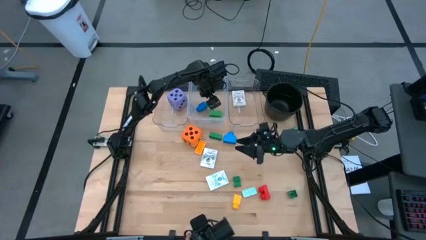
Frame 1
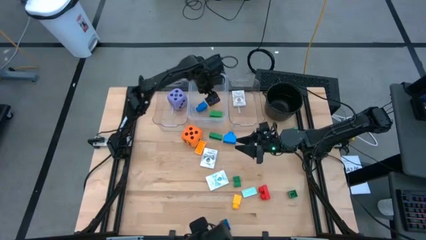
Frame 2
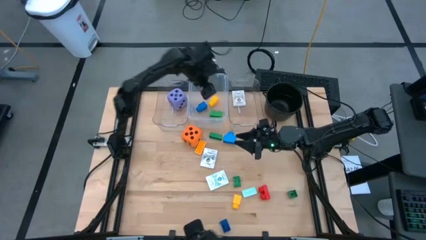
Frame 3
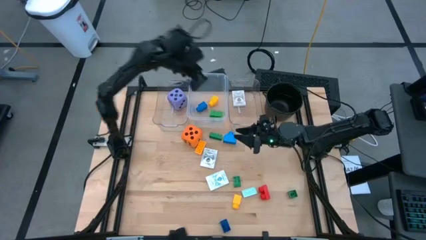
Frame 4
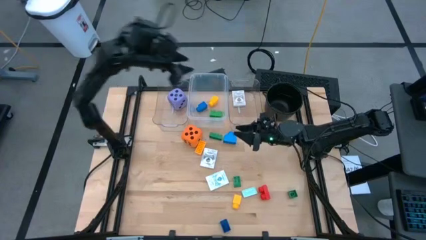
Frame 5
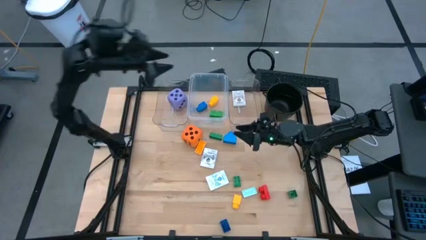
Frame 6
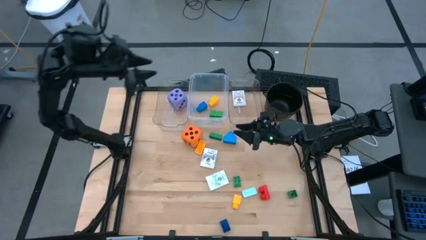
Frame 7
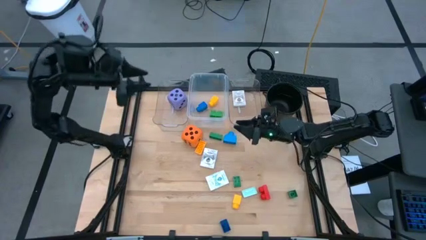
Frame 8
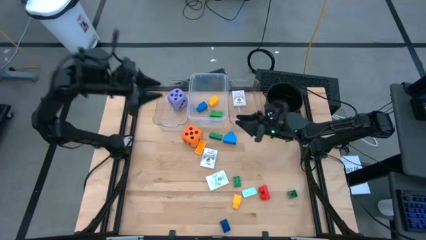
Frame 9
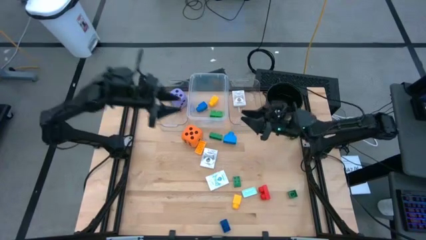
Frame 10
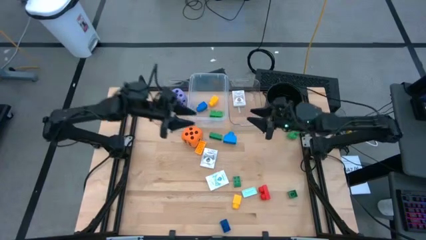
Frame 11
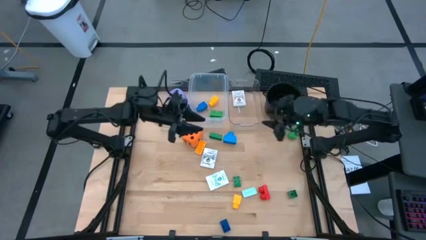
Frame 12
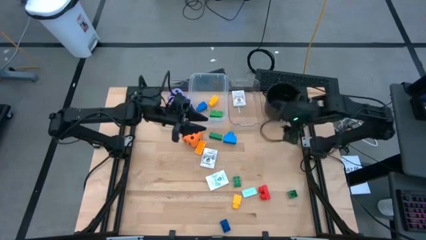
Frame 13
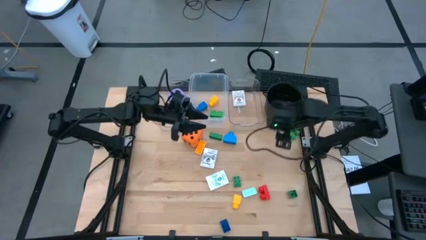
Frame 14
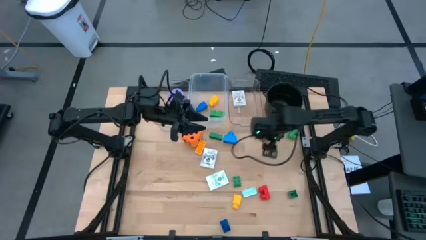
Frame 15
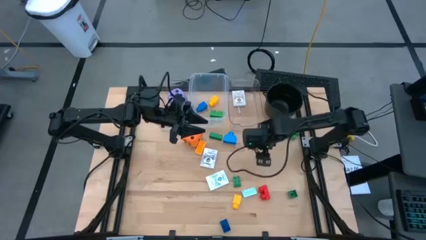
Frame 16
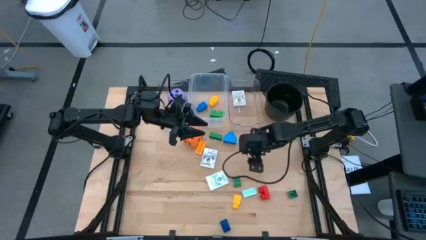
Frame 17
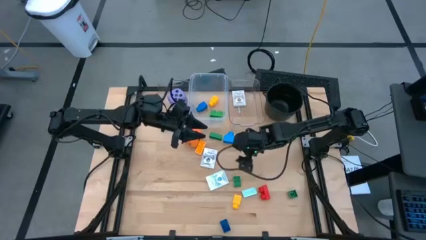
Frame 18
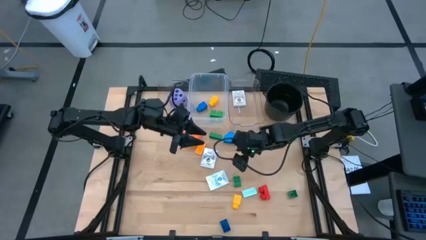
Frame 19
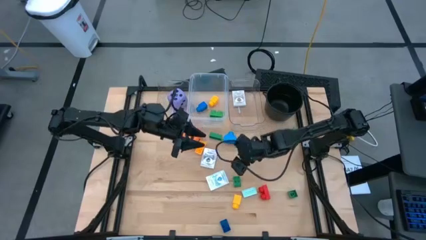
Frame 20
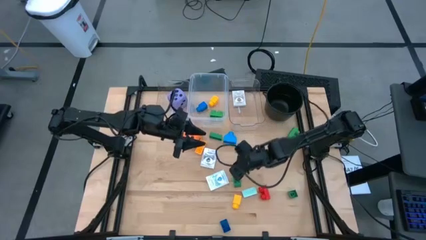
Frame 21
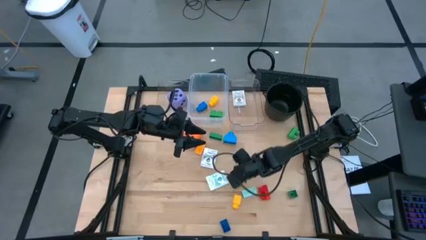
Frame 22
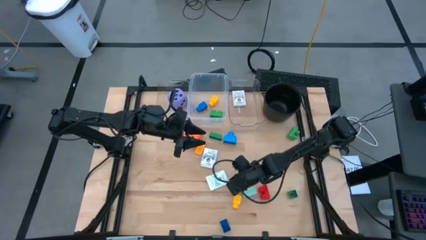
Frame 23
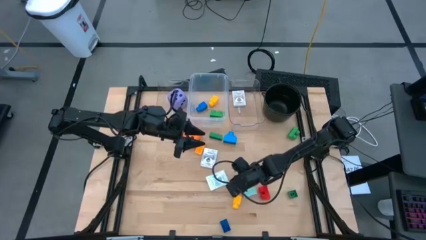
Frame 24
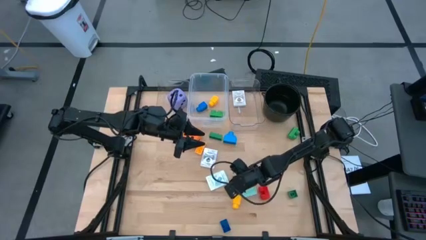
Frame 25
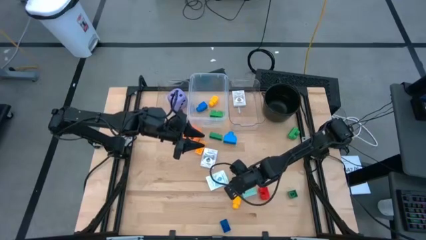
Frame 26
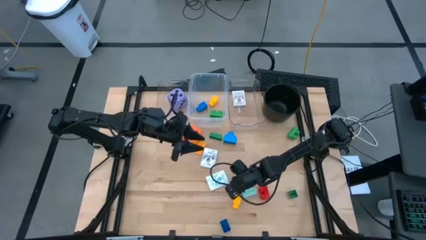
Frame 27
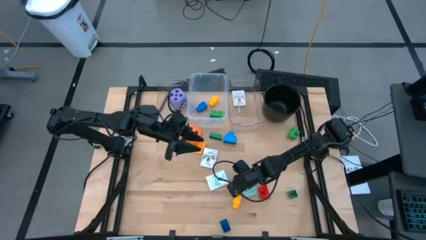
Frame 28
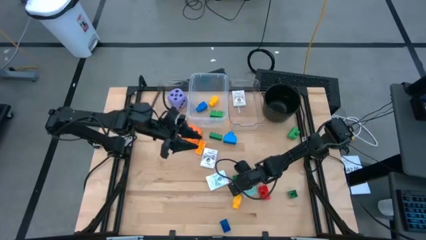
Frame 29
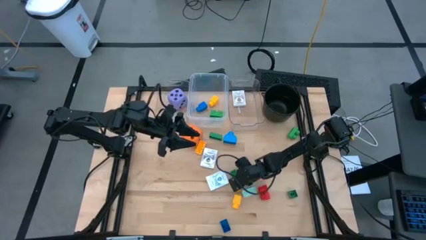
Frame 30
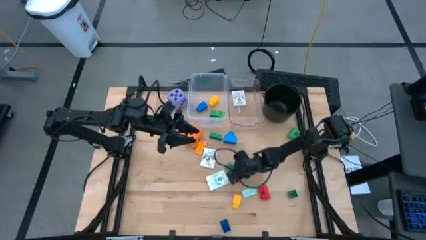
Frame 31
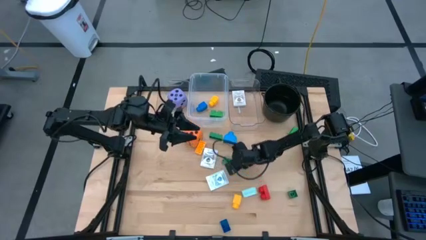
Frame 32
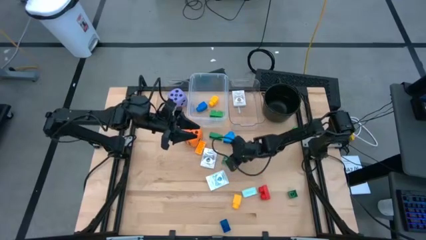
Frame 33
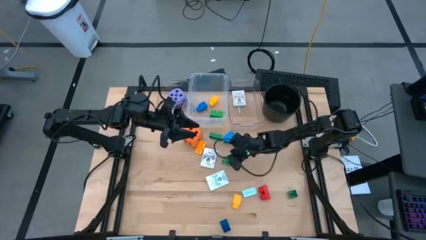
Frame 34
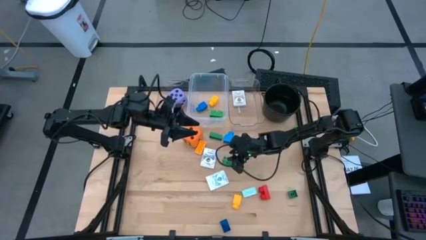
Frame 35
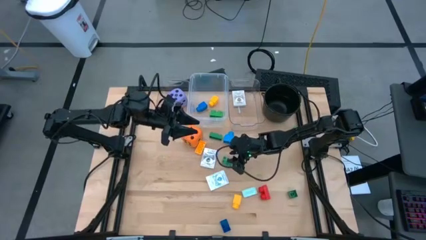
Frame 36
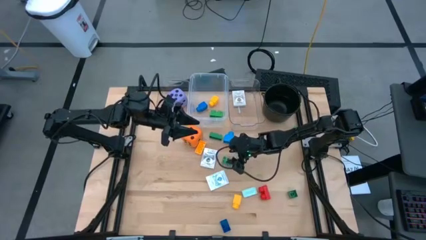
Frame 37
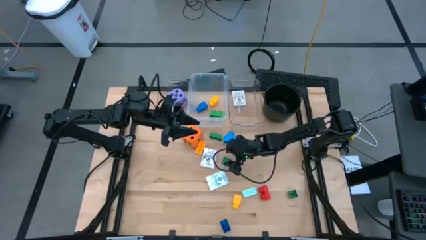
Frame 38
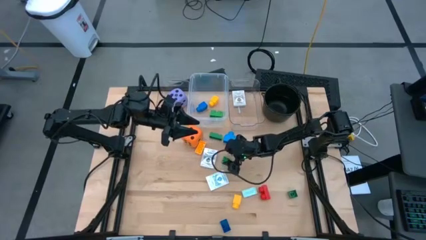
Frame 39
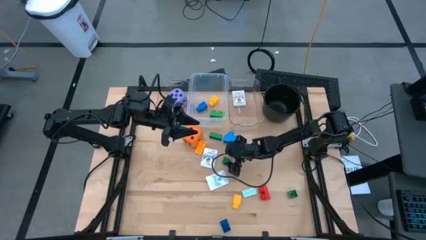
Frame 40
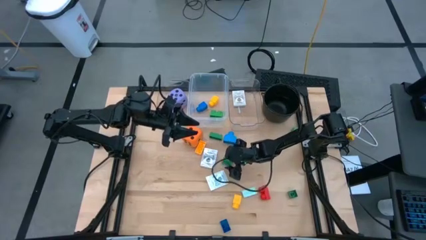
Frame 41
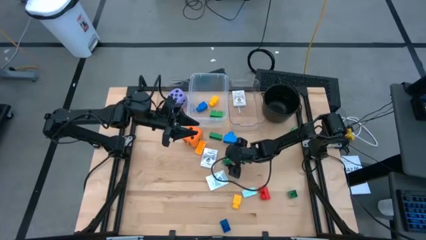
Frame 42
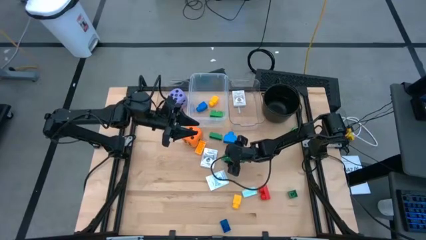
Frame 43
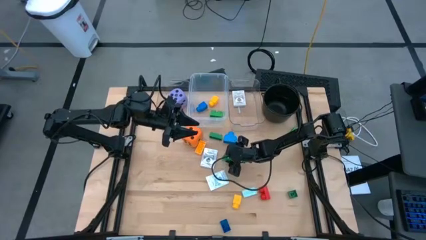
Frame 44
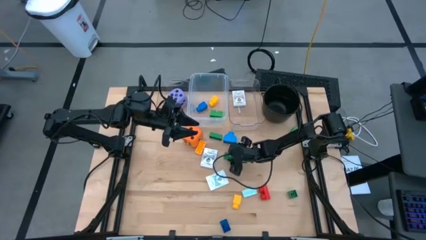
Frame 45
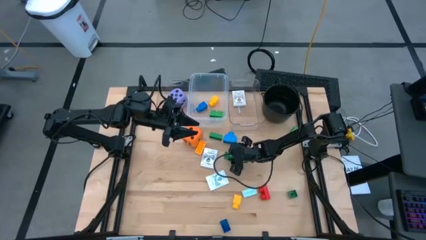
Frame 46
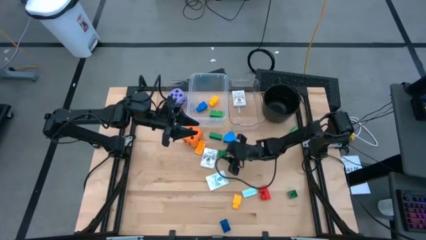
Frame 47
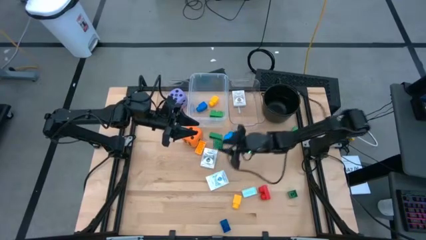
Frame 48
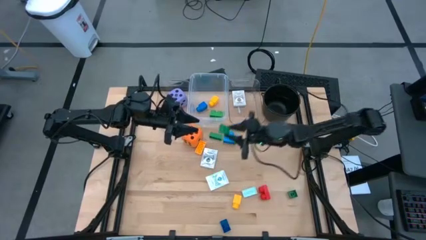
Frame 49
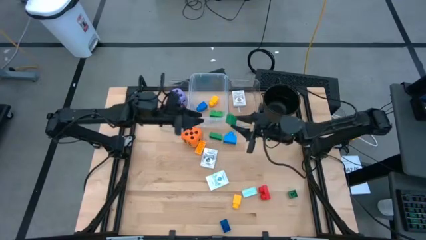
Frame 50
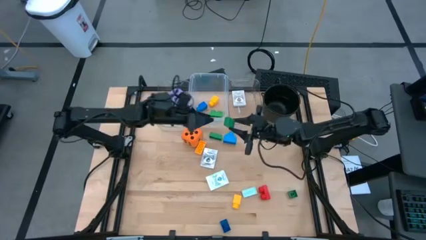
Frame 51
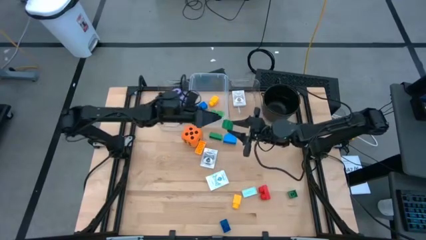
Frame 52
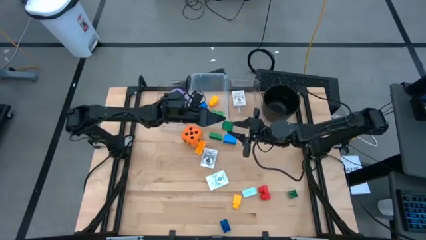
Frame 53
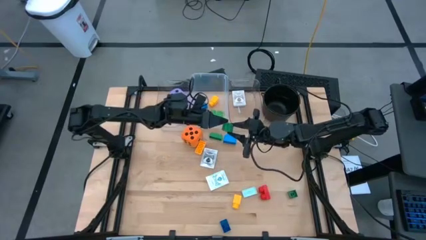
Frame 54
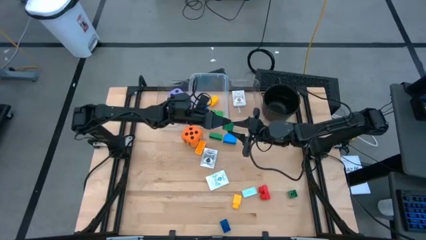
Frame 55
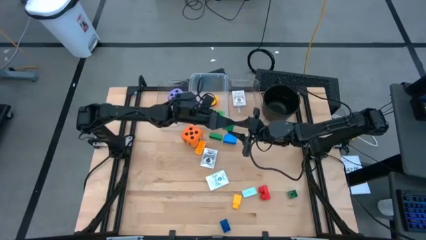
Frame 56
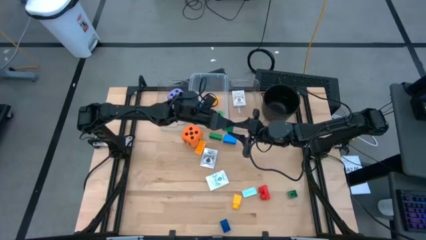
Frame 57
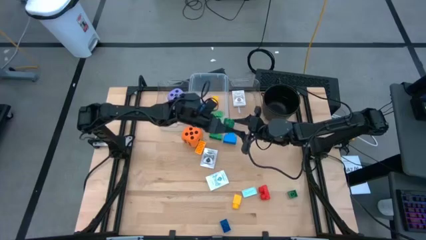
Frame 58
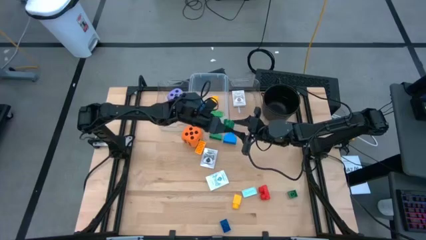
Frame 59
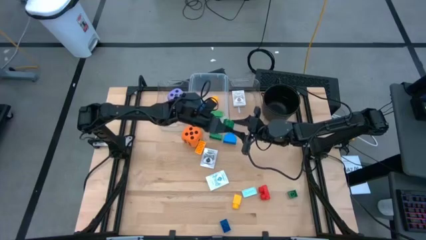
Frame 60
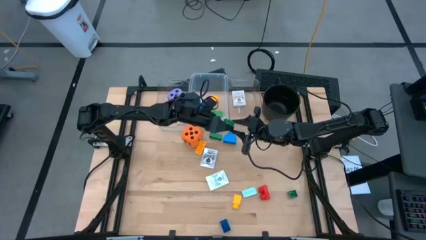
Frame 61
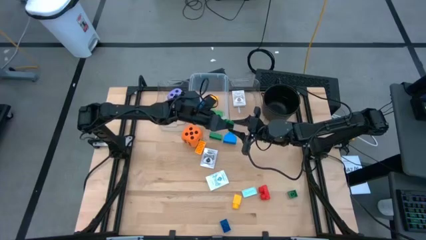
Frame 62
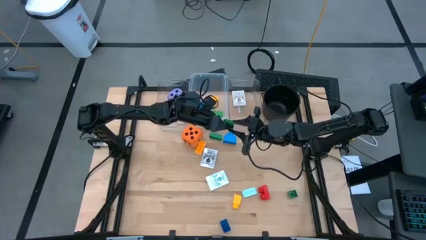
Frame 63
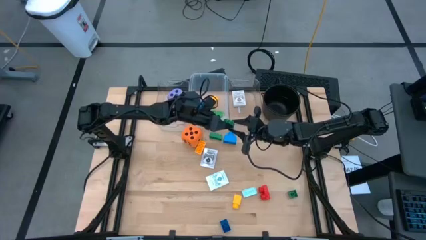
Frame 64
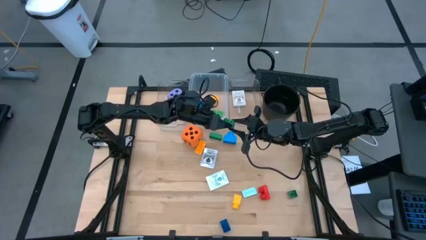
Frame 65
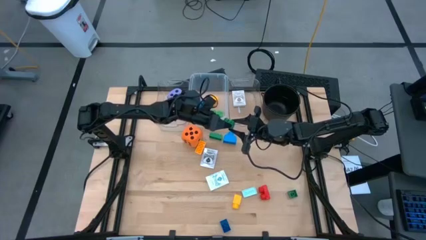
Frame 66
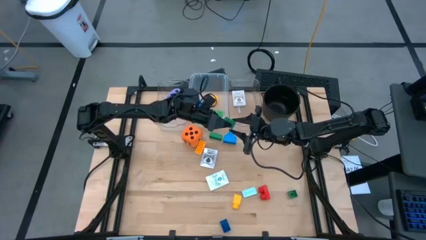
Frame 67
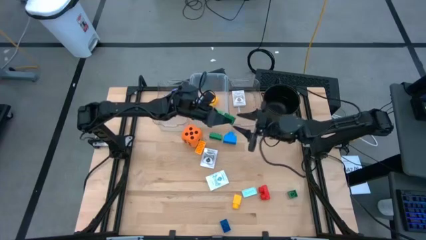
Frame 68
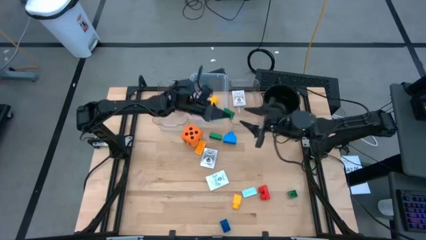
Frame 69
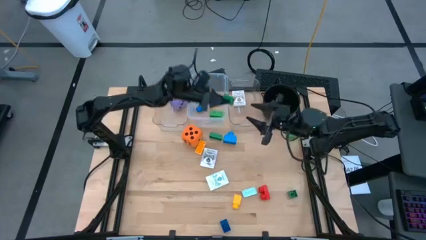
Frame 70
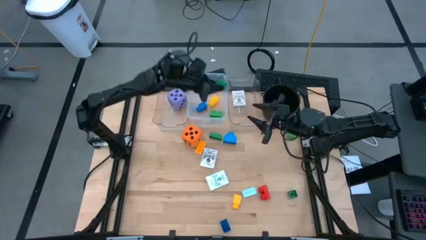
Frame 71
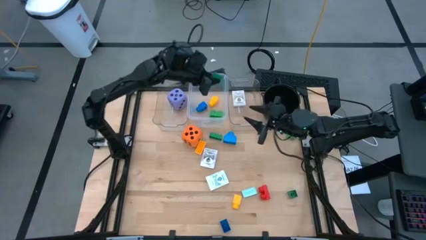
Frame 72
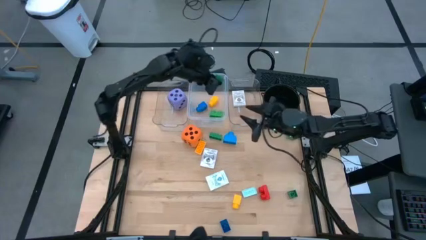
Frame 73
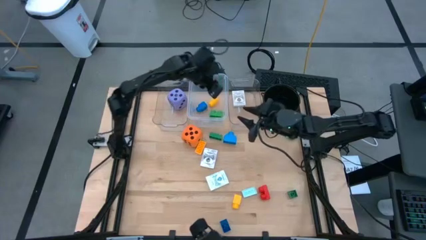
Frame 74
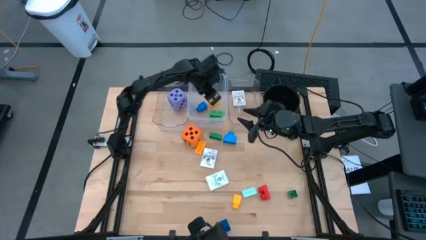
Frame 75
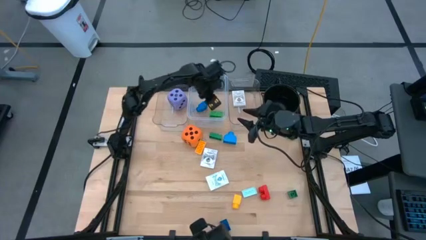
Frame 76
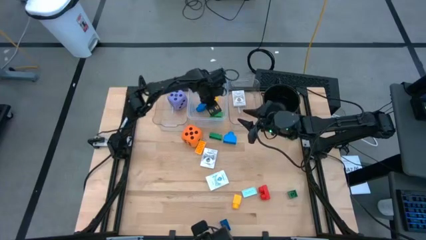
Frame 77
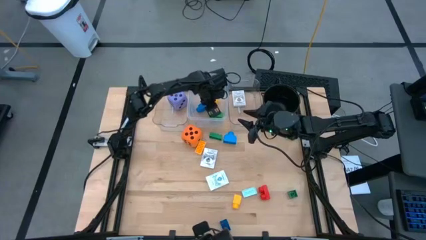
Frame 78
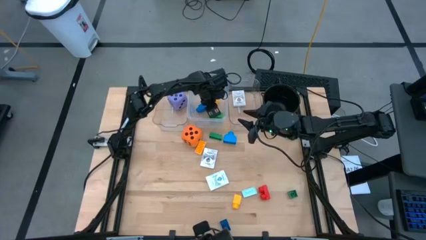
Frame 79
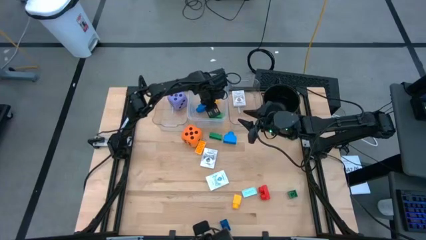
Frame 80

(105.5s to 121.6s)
Task: Pick & Place Toys
Put the green four stud game piece into the middle transparent bin

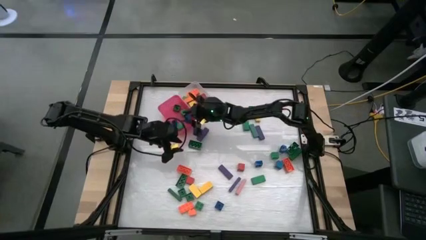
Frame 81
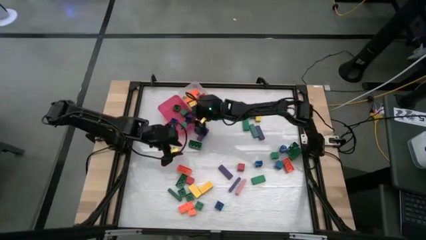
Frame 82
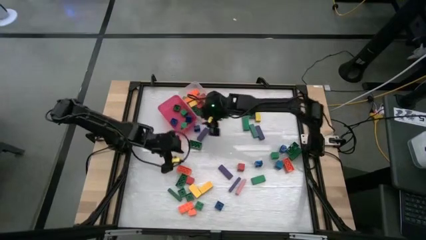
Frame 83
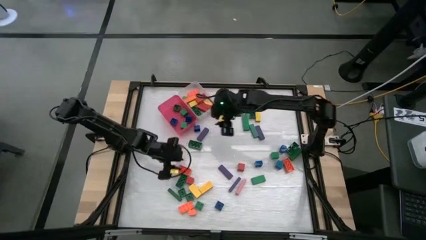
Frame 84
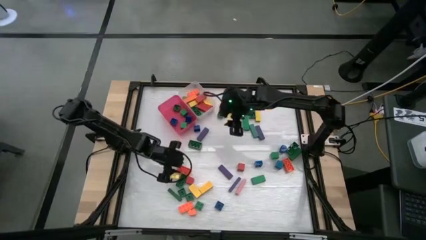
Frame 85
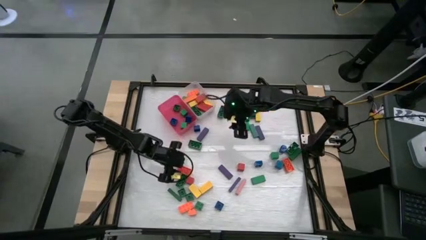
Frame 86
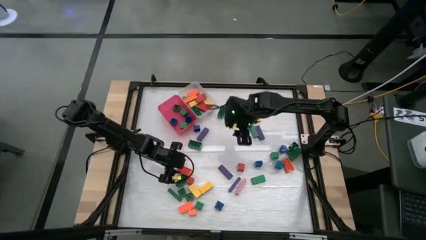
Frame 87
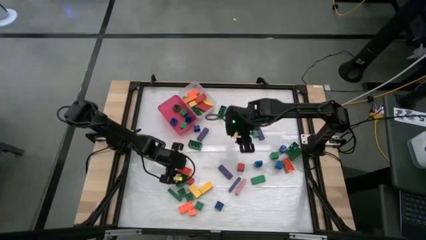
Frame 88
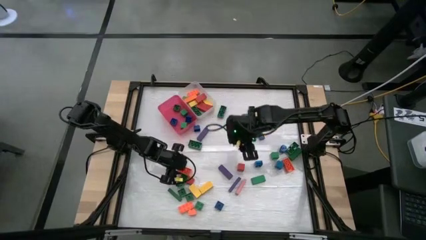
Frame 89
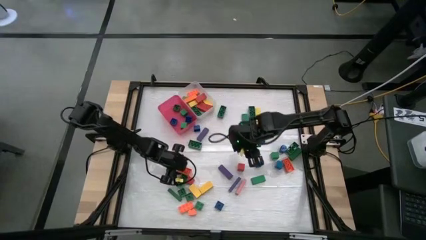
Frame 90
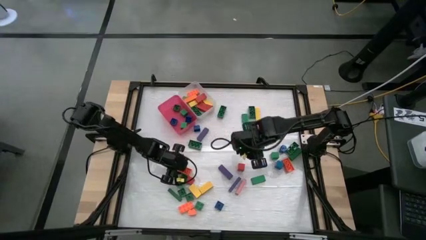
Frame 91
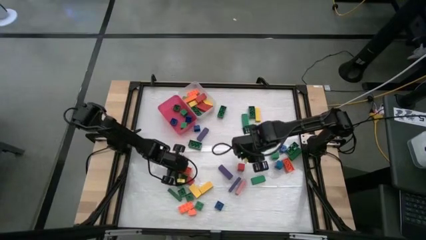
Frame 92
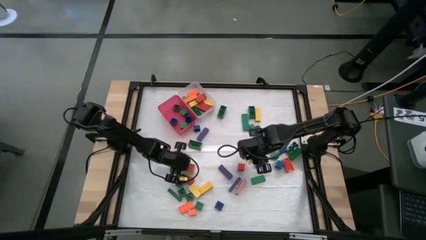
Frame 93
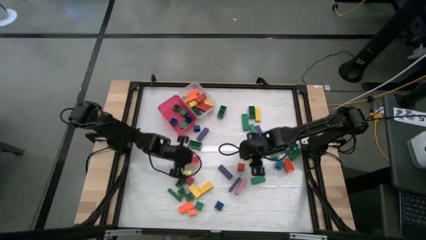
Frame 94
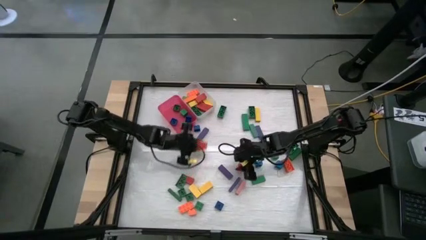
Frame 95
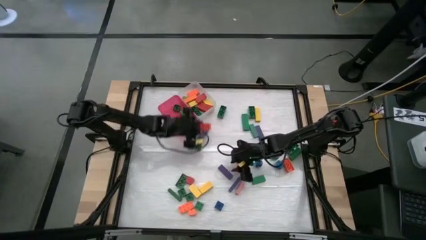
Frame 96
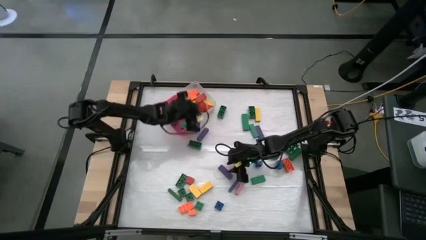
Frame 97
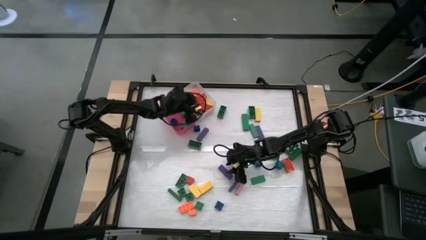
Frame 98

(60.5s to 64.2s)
Task: Sort blocks by size
Put the big orange game piece into the white bin
